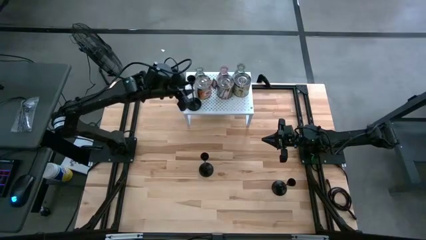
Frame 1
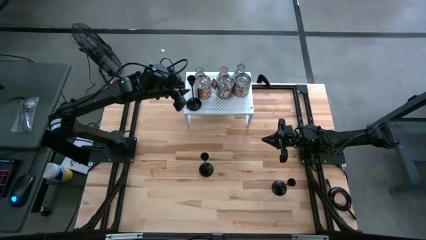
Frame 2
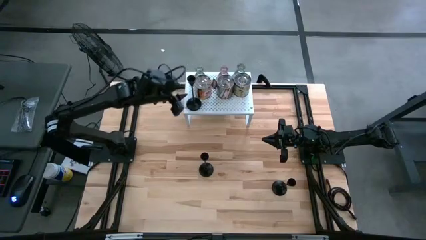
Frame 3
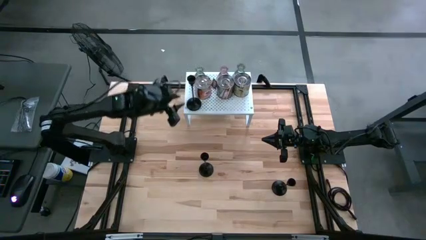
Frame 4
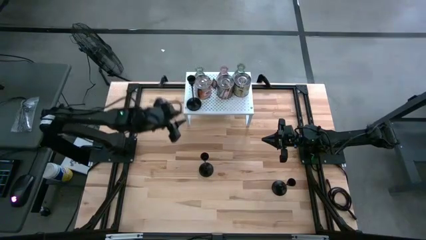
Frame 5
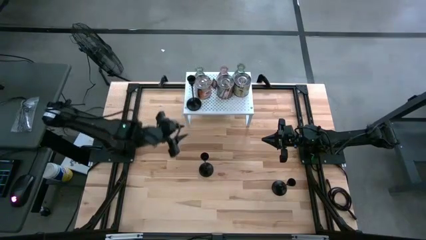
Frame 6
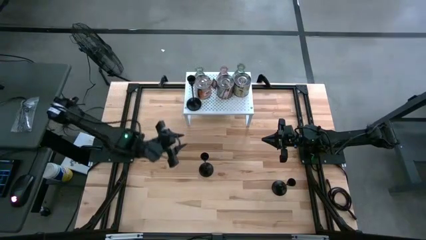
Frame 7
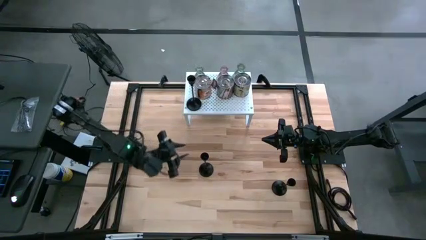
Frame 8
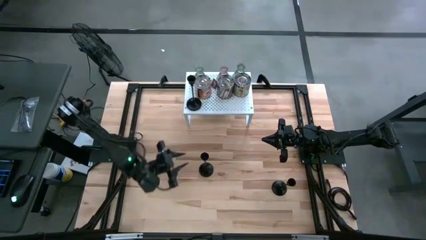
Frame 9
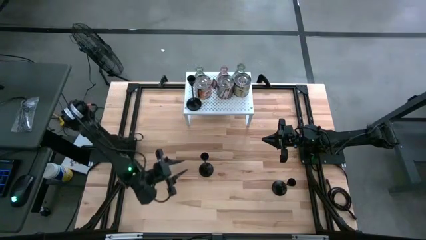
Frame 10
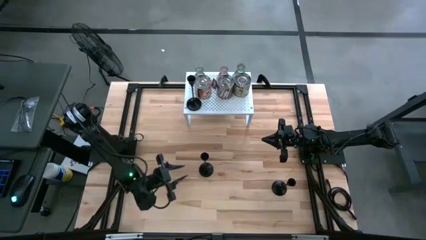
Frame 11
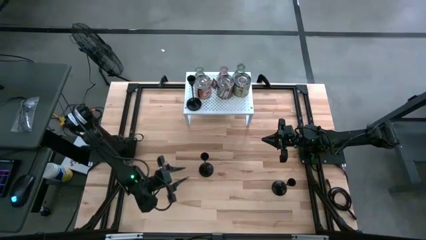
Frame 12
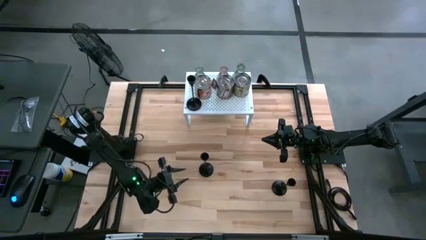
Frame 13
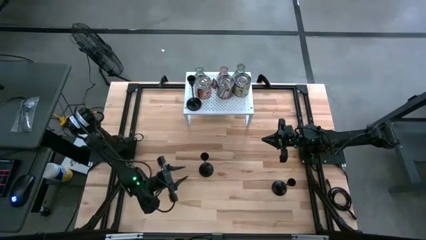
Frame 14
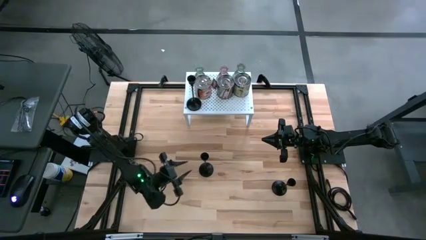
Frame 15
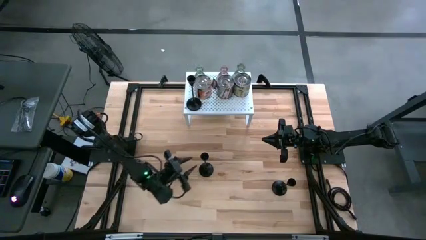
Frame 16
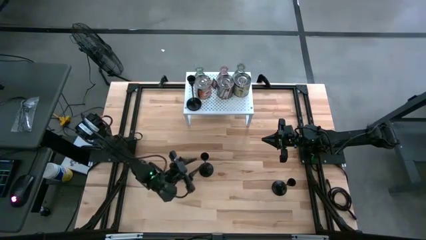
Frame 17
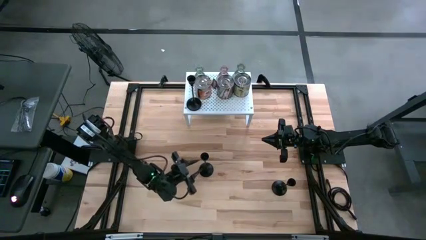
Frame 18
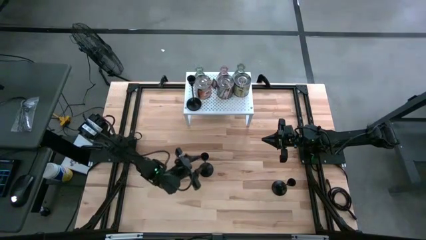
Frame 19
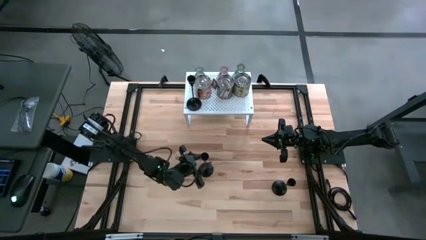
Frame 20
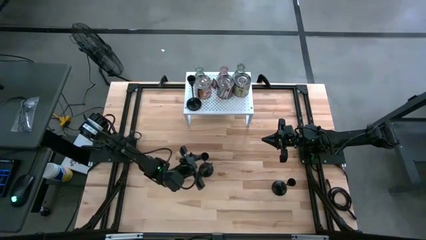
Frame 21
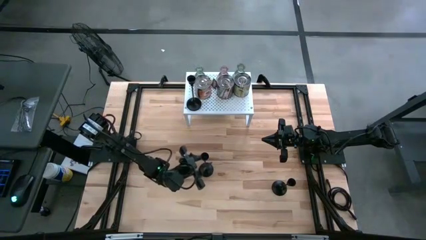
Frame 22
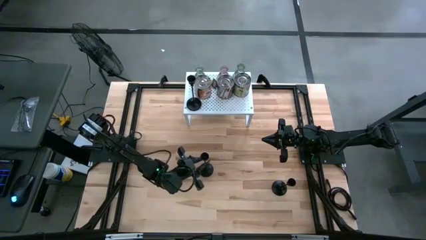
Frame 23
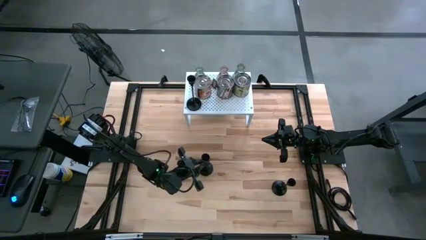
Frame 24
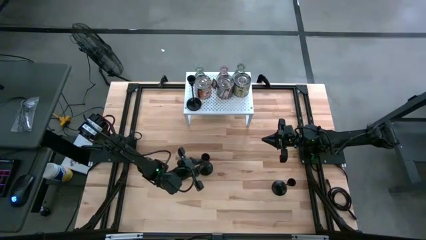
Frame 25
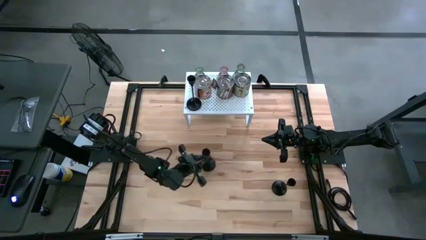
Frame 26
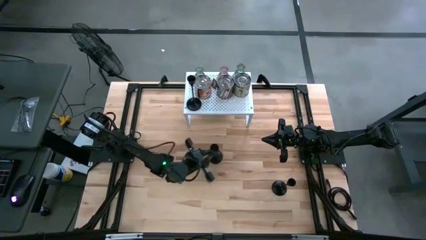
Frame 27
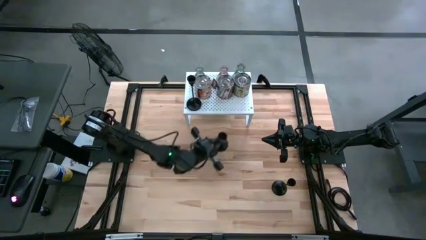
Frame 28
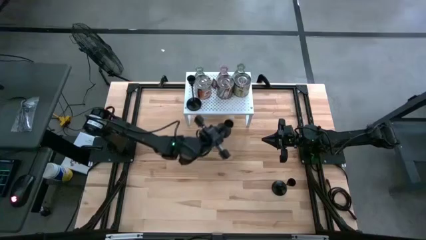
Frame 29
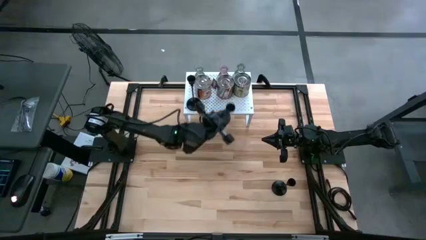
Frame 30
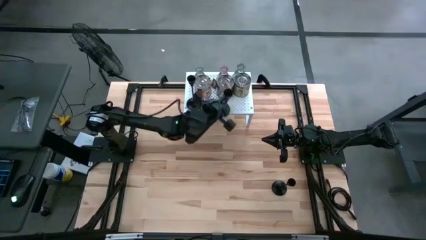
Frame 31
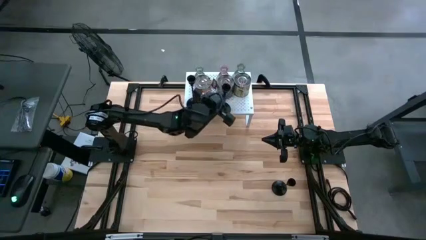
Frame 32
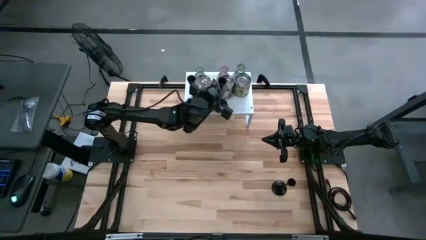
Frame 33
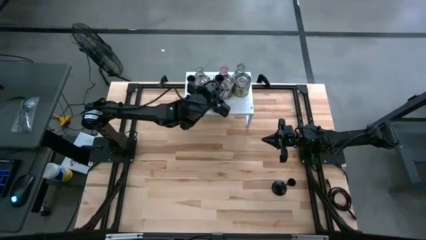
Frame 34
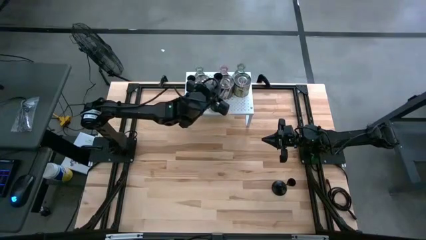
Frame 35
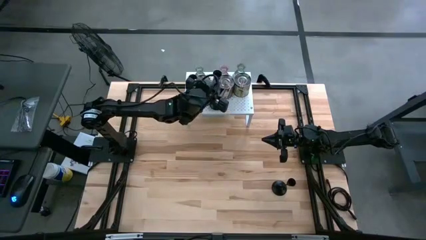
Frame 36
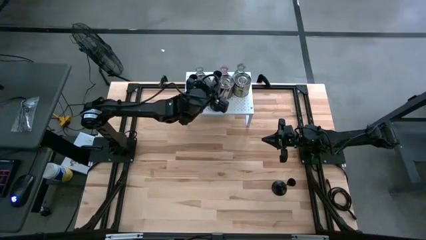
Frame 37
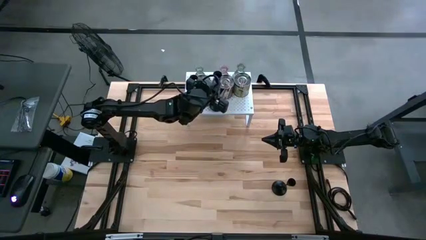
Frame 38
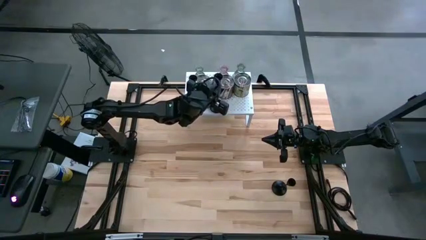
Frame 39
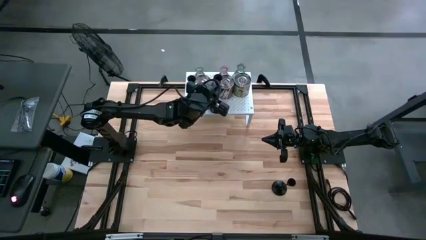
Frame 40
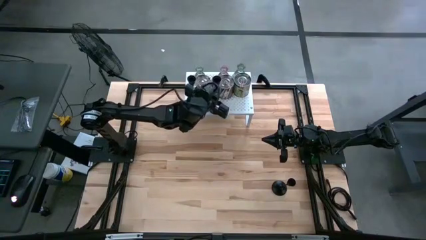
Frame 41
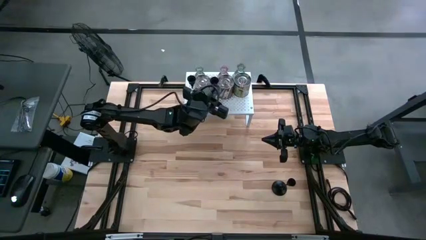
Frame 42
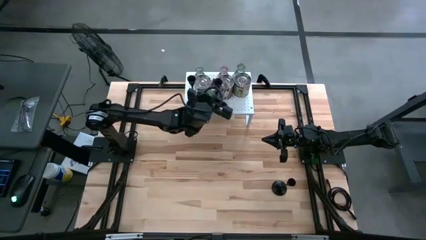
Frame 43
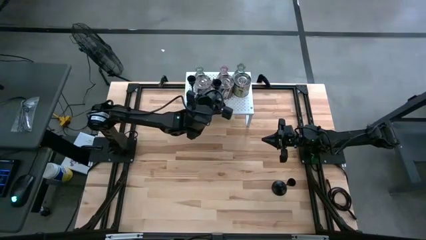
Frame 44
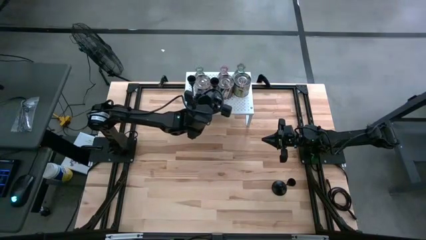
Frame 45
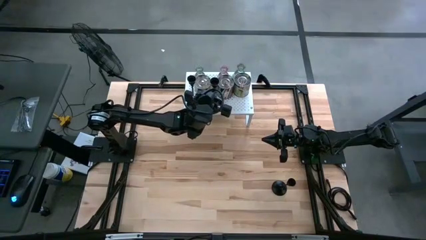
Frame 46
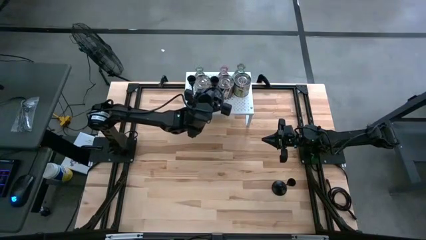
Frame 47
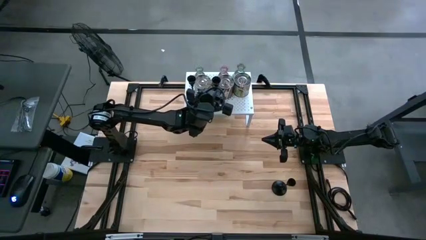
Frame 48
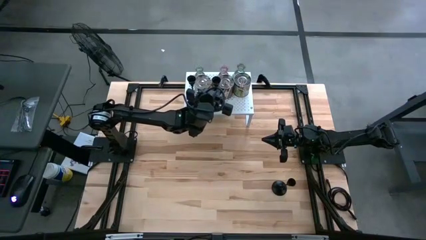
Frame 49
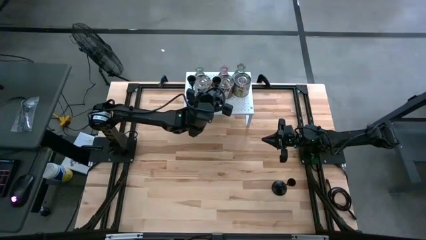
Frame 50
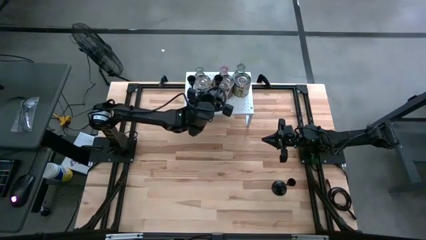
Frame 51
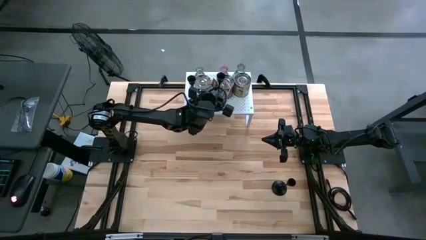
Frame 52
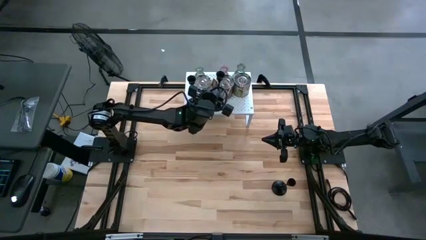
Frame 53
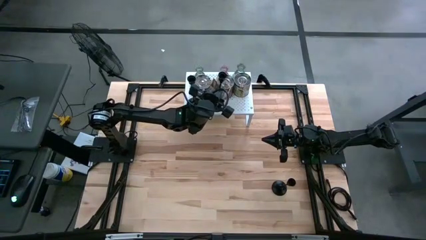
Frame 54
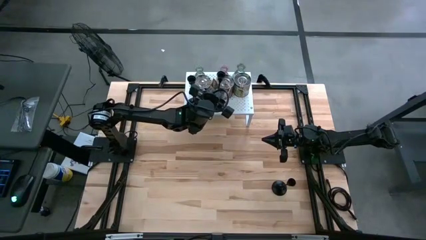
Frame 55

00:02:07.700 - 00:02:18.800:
Task: Pick & Place candle stick holders
Put the left black candle holder on the shelf aligned with the other candle holder

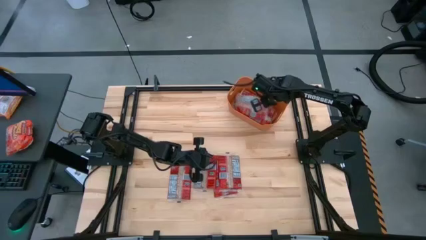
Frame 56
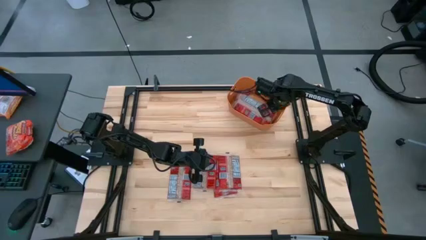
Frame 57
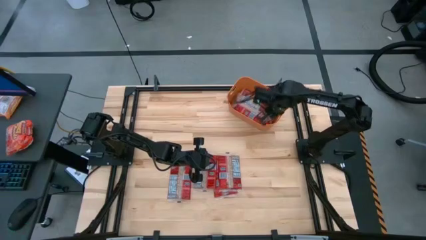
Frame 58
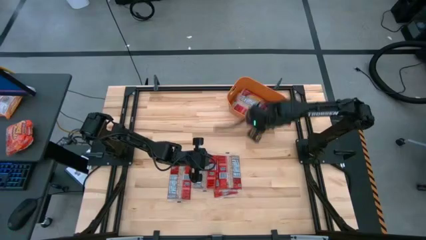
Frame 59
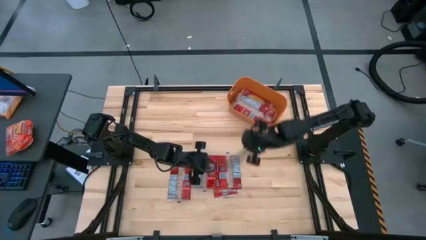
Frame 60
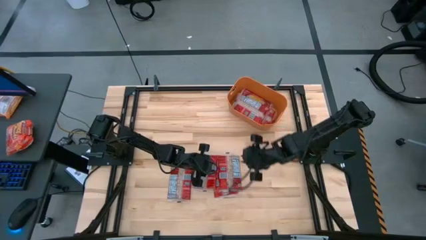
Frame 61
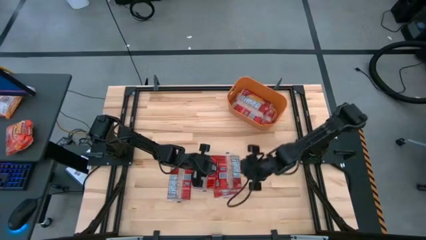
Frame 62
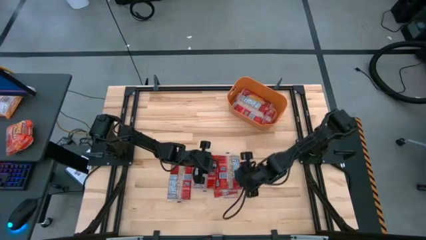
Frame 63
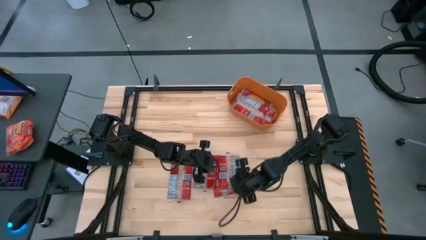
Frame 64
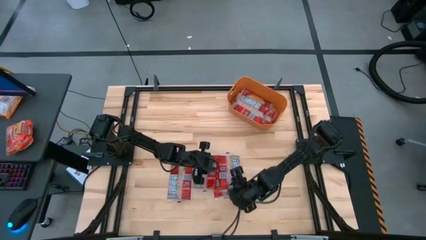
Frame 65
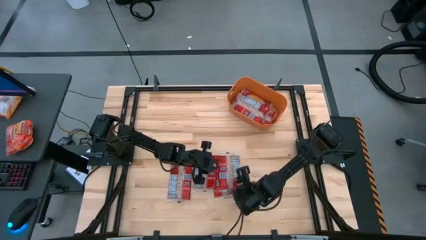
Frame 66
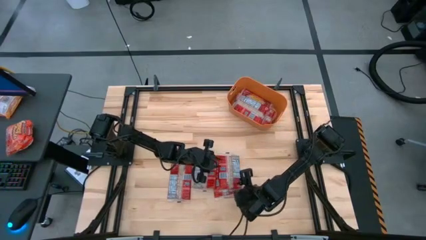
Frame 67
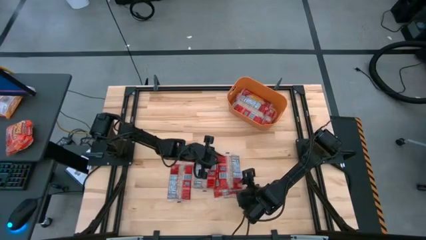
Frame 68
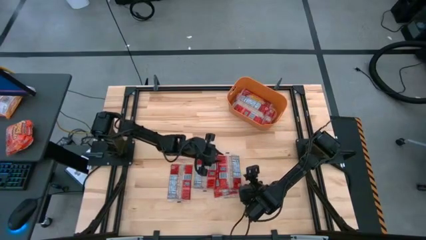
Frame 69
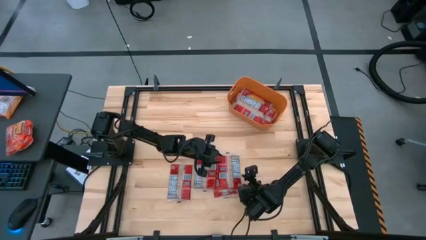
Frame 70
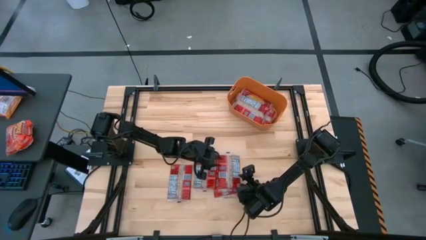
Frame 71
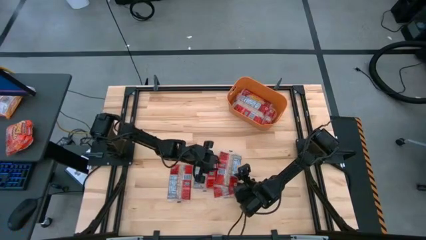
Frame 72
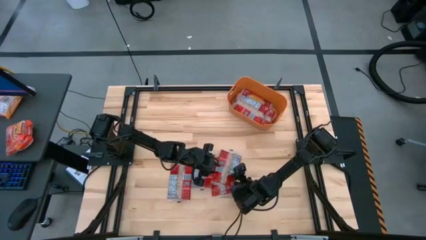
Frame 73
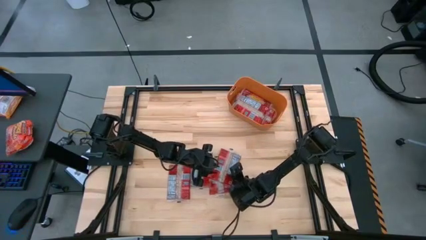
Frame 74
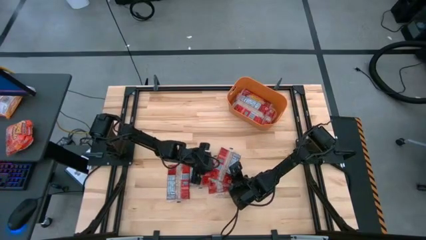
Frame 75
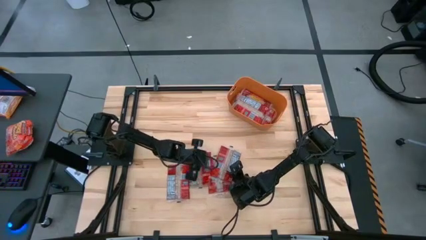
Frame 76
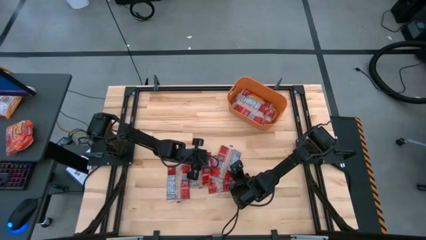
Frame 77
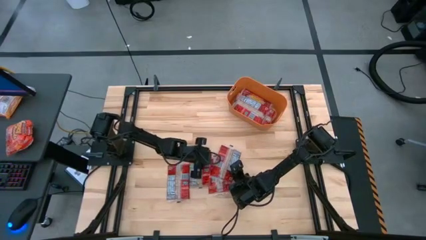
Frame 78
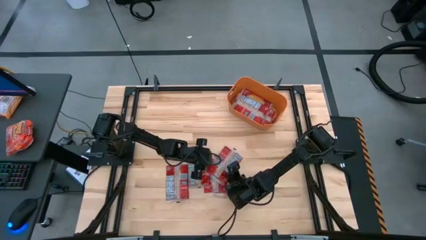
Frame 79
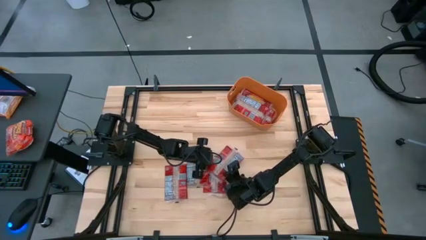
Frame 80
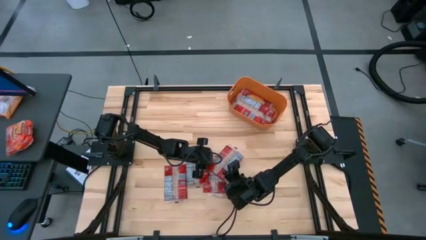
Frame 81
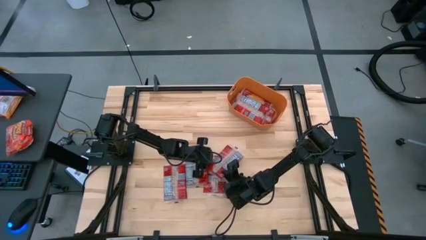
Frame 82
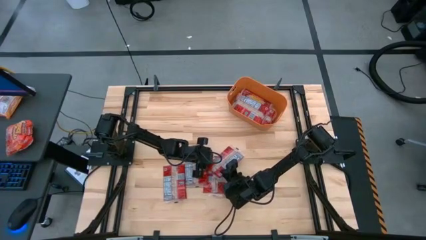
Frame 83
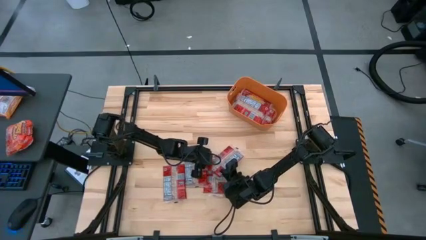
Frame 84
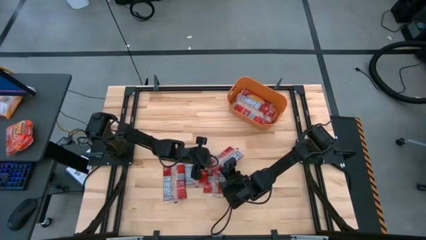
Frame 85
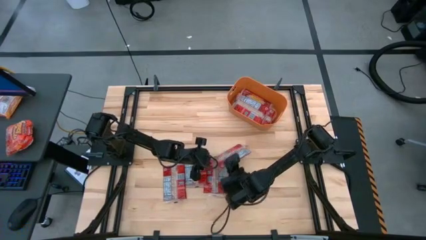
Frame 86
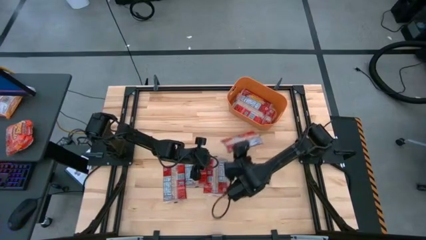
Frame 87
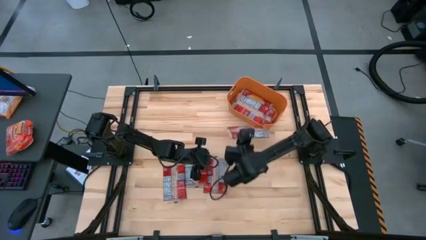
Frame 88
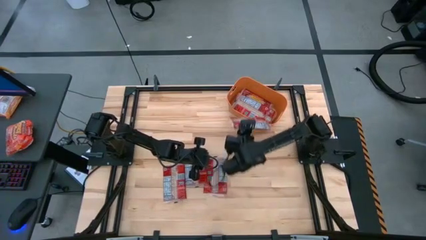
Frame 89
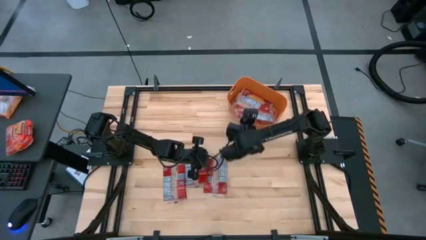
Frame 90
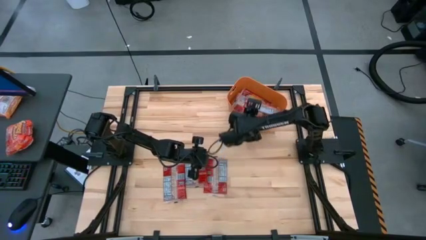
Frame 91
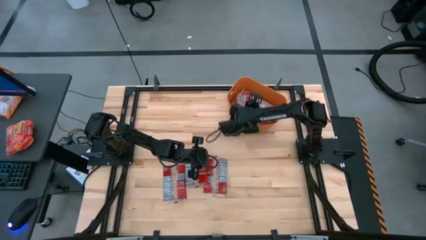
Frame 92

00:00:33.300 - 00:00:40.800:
Task: Sort popcorn bags into baskets
Put the red popcorn bag into the orange bin
